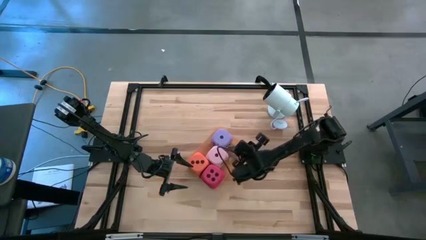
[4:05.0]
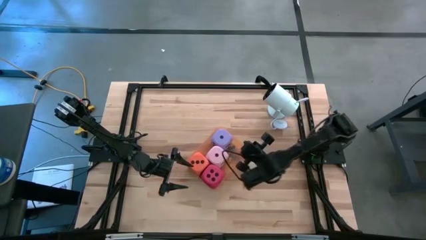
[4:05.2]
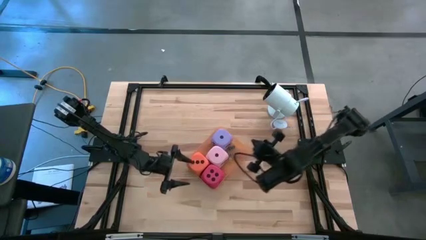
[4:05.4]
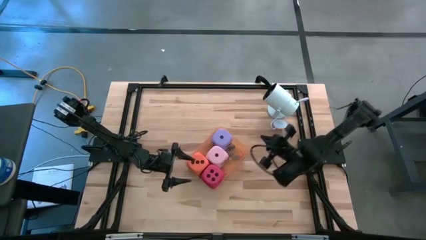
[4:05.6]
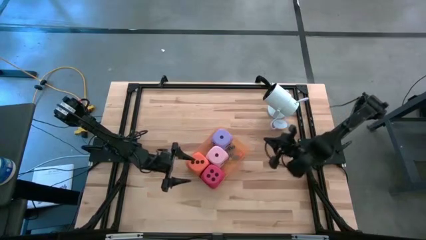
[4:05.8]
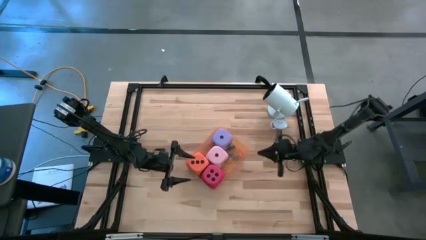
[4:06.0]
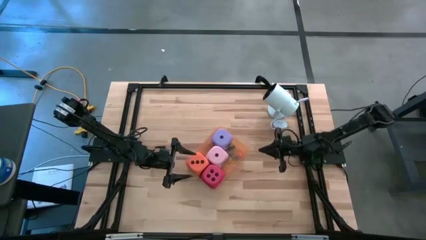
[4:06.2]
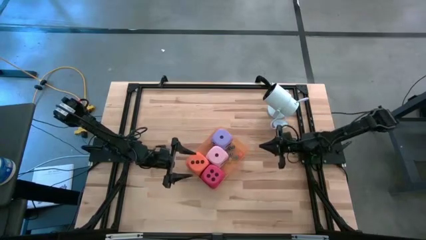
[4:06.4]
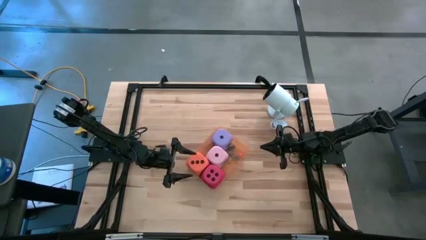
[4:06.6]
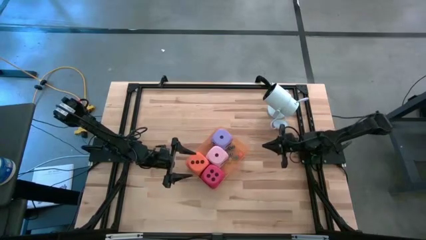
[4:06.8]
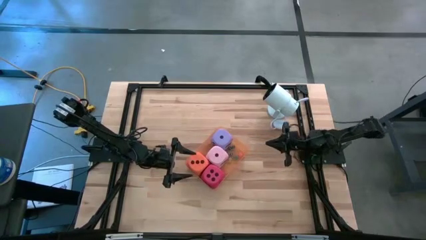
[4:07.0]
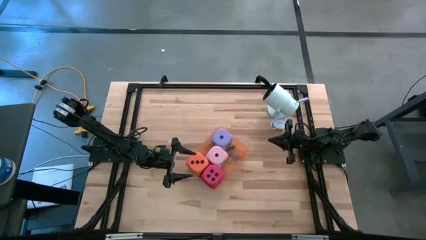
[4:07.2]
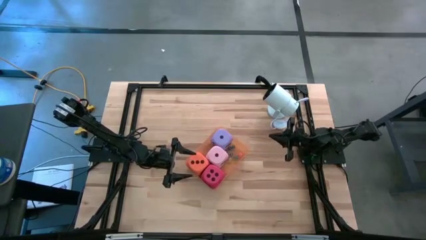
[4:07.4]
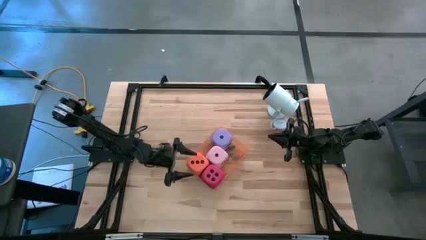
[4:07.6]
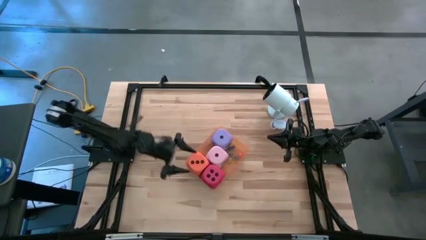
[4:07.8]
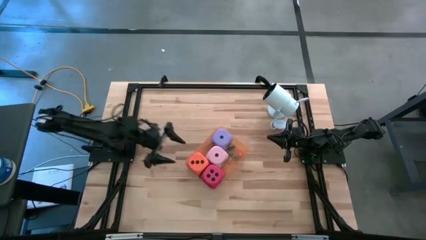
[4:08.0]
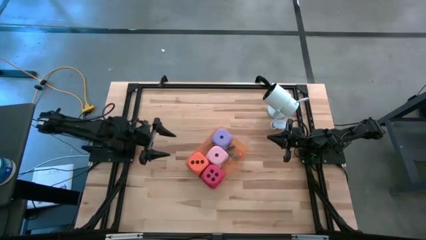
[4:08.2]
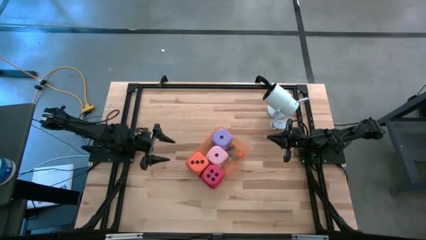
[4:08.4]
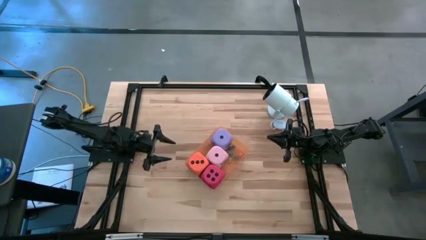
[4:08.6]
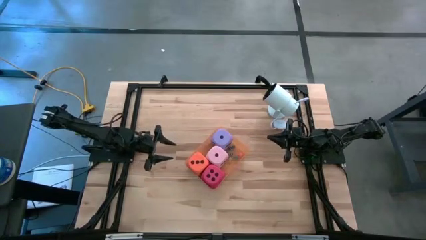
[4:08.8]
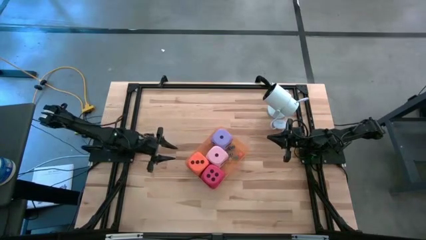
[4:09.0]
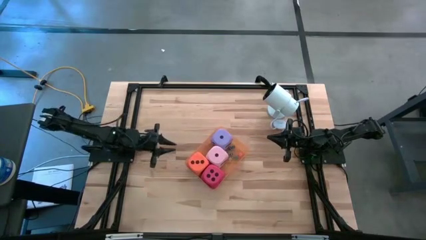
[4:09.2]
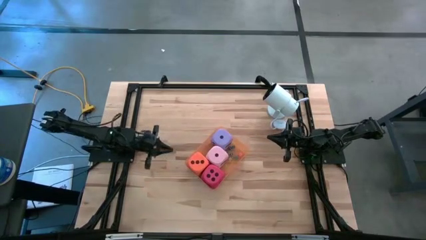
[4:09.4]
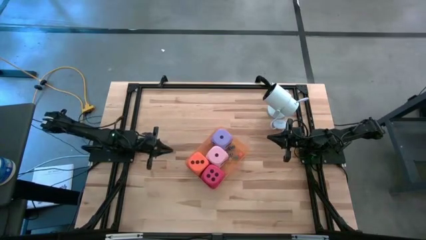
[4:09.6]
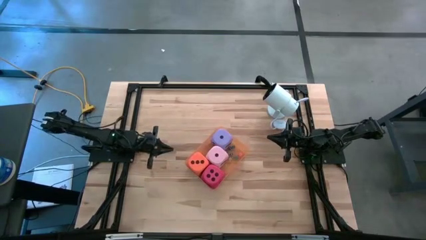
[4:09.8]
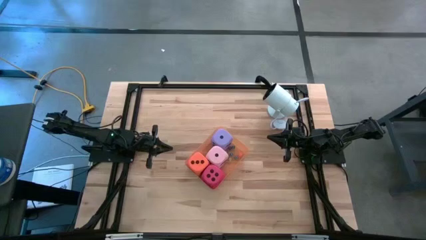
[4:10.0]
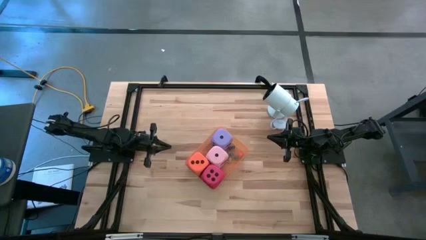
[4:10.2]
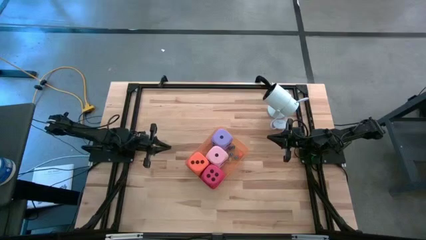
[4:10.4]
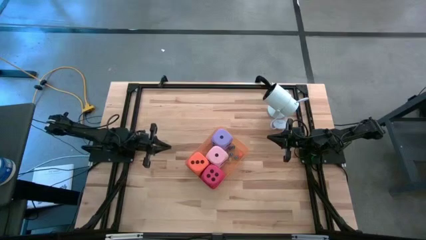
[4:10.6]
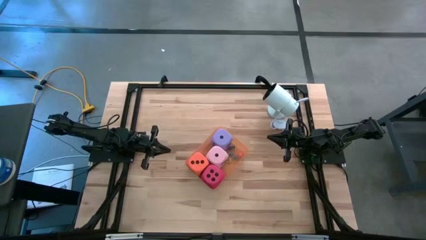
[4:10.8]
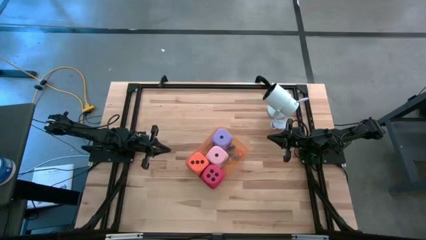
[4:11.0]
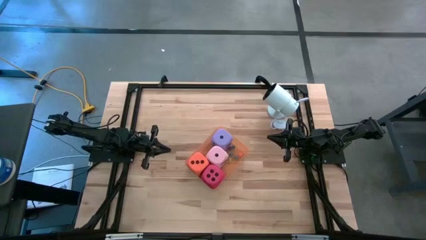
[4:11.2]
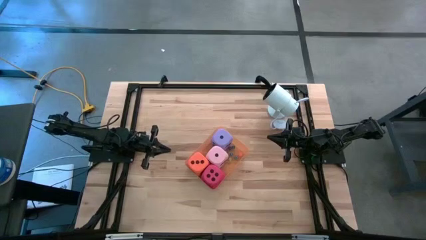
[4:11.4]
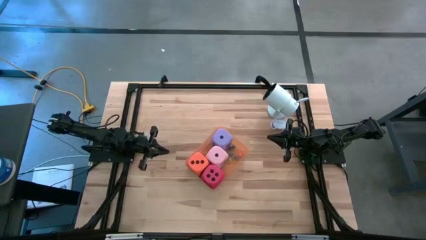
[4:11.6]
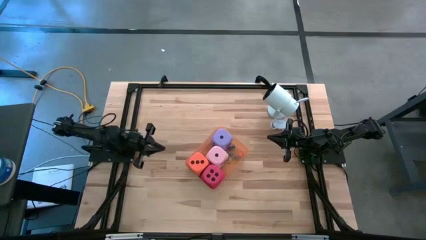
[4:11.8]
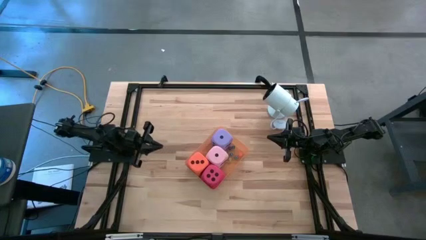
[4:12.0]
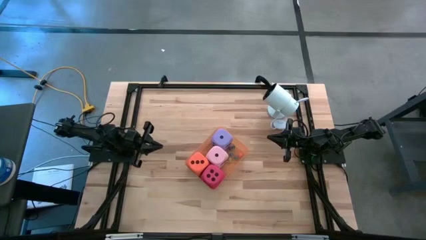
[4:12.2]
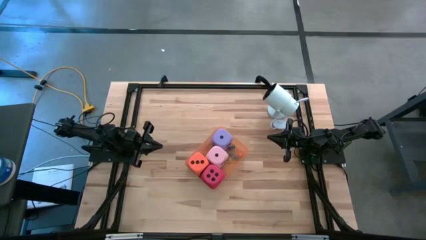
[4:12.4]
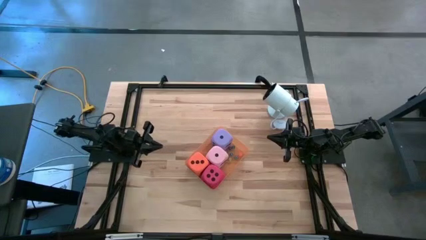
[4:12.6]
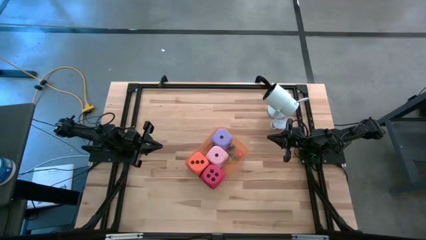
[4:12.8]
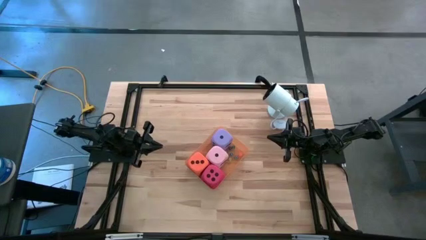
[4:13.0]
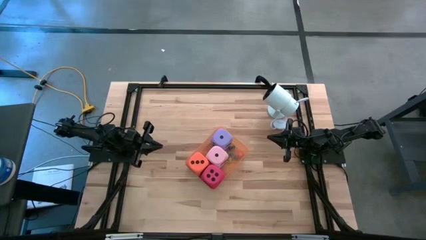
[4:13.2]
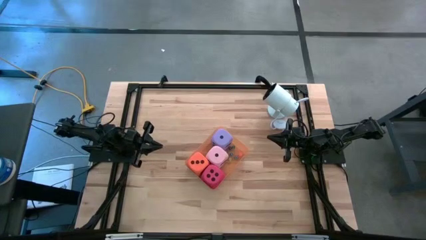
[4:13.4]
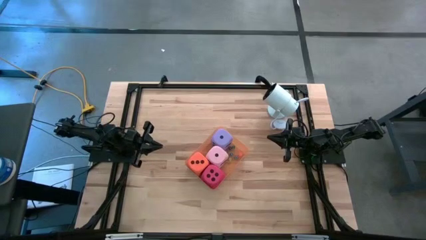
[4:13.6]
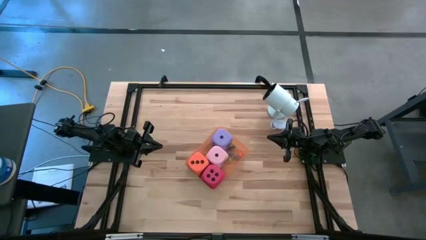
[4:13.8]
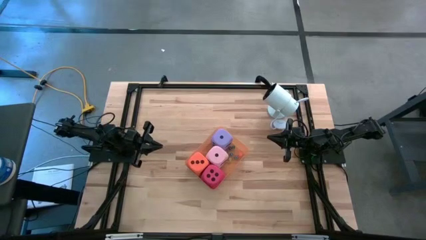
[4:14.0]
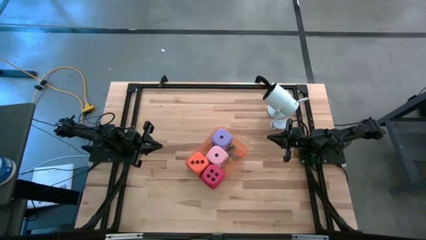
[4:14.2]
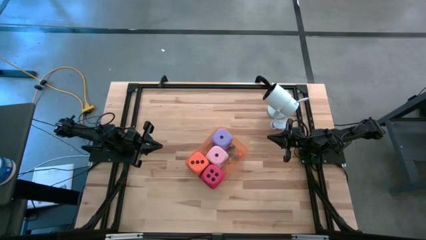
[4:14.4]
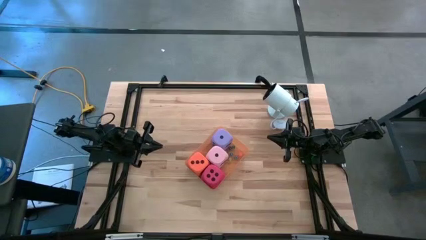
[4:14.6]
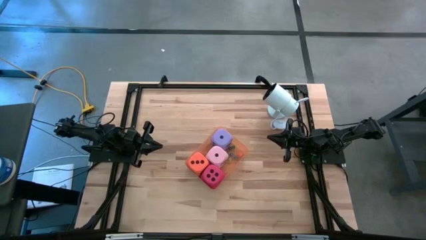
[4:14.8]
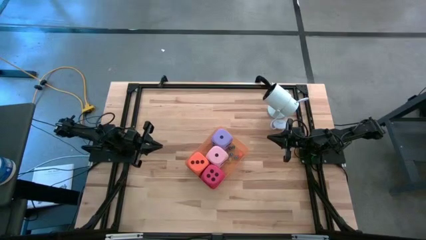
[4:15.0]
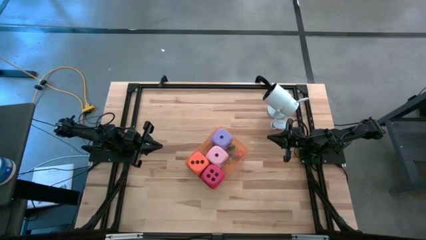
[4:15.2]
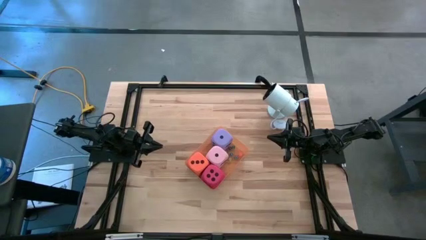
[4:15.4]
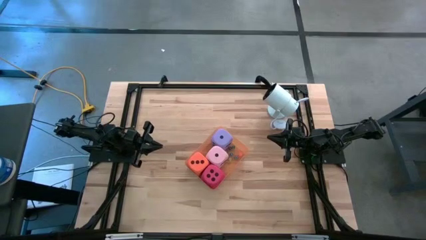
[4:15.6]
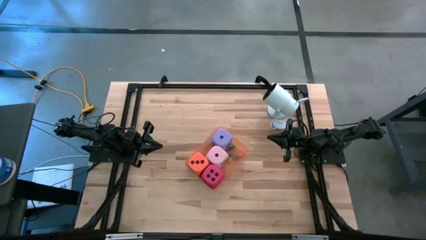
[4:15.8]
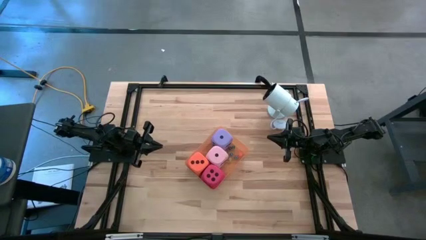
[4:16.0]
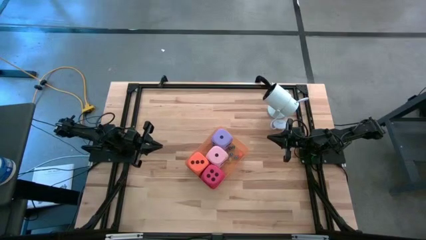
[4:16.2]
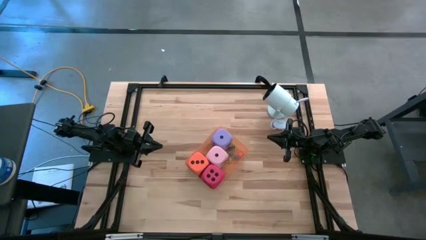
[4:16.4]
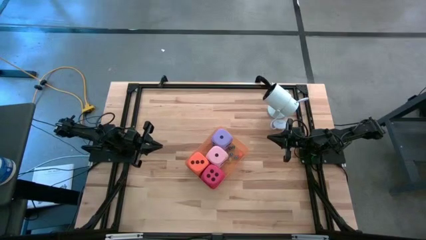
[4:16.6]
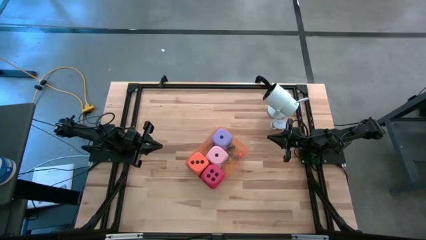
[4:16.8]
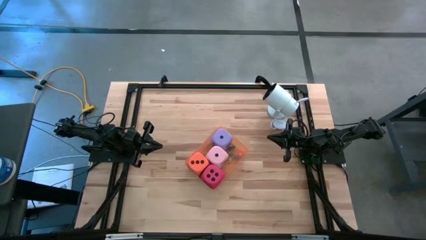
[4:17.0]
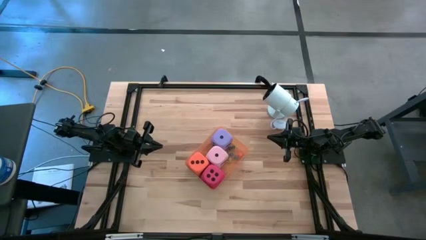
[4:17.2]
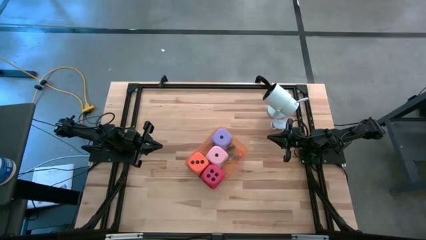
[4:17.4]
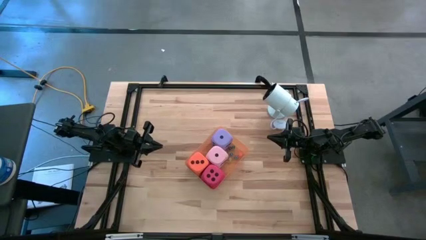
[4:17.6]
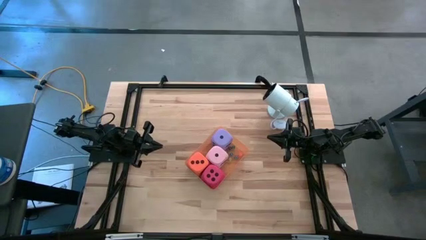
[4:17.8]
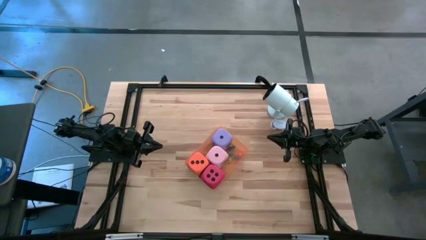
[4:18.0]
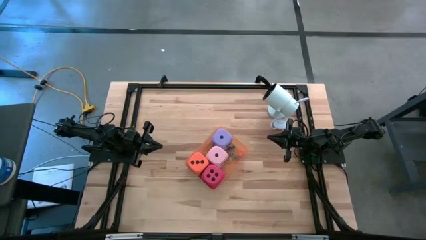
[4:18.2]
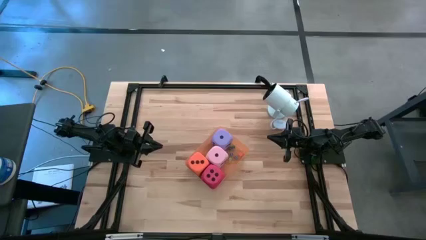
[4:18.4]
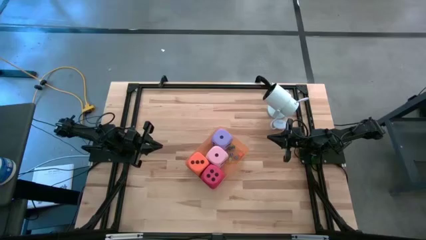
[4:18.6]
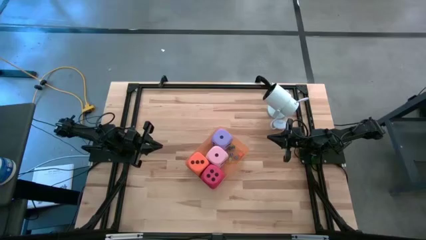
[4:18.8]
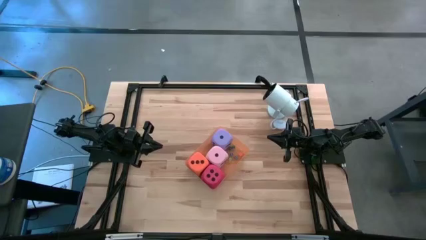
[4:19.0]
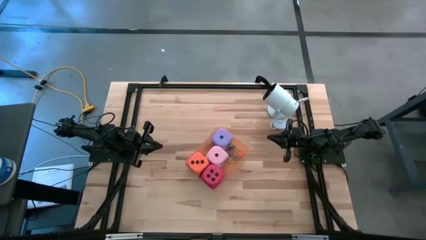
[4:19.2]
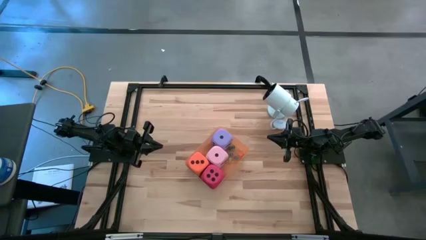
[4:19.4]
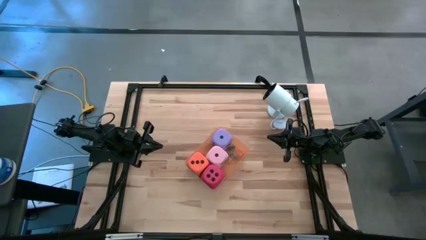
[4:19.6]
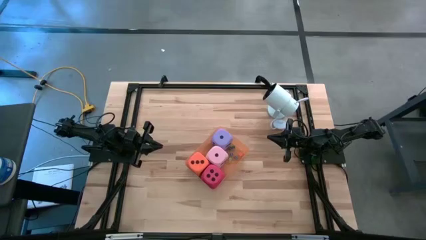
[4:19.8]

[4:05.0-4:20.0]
Task: Pick & Place Dice
Return to Home Position

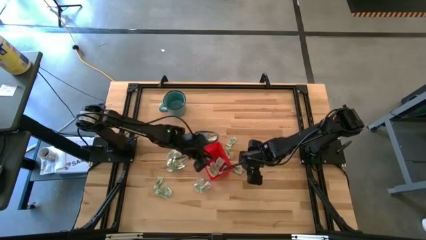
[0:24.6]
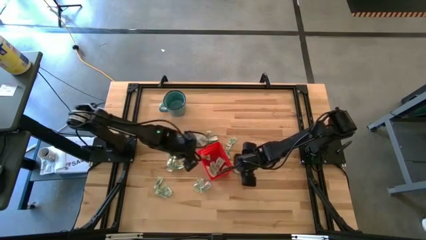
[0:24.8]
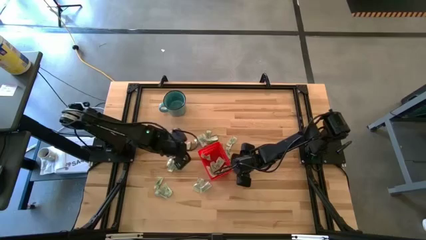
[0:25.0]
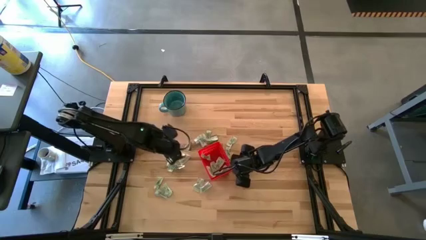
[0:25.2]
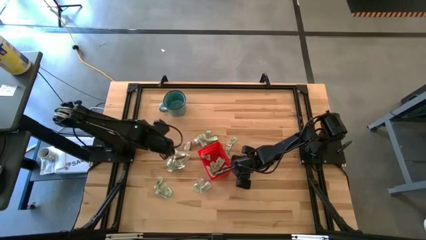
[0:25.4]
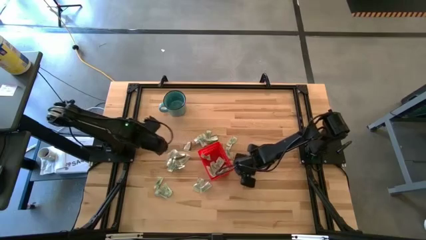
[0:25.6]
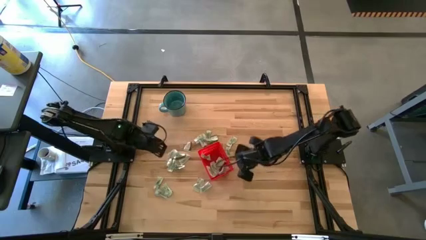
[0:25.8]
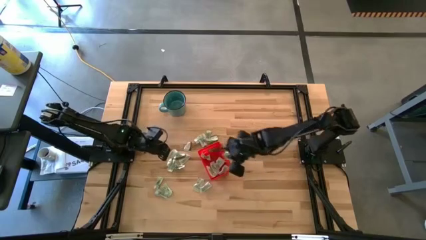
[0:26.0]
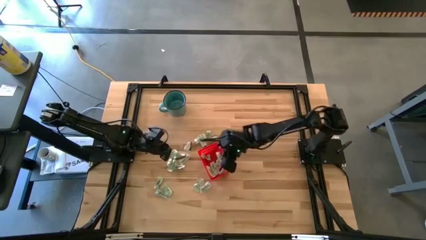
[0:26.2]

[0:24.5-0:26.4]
Task: Pick and place Stevia / Truvia into bins
Put the white stevia packet into the basket

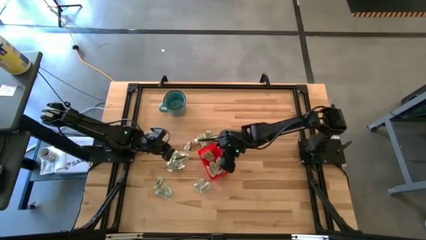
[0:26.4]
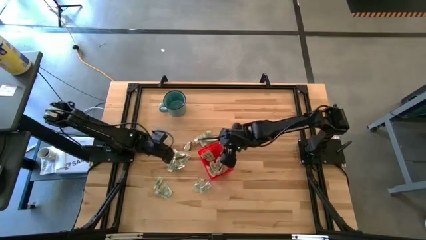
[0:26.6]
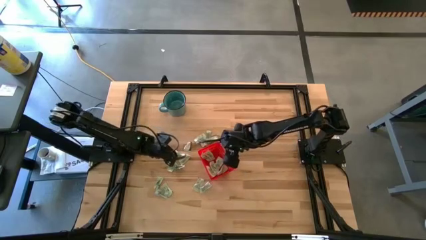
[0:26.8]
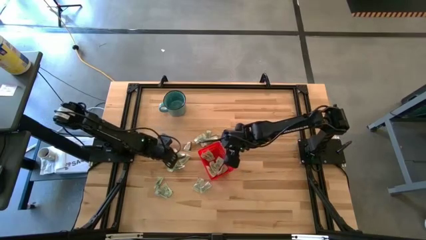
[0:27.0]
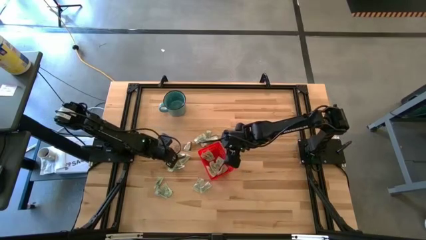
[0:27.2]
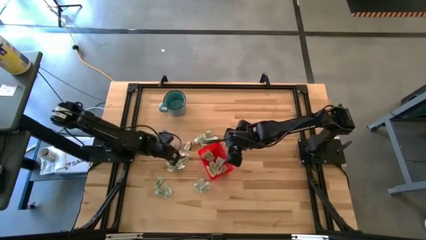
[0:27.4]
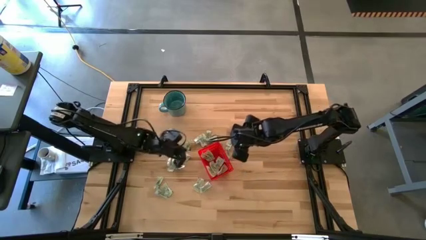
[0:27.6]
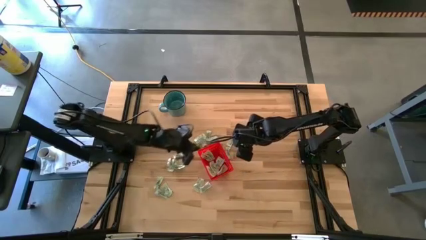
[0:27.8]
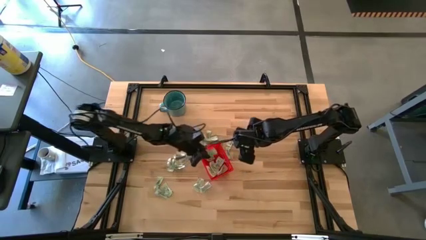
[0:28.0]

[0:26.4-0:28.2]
Put the white stevia packet into the basket
